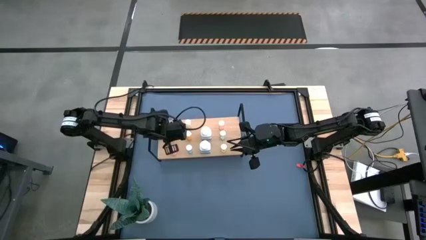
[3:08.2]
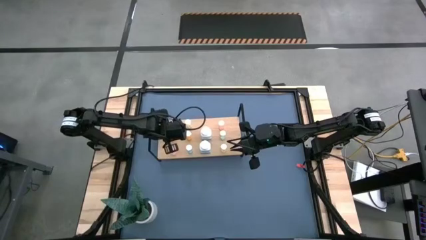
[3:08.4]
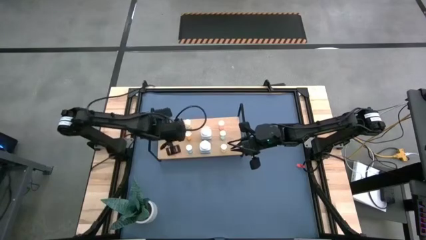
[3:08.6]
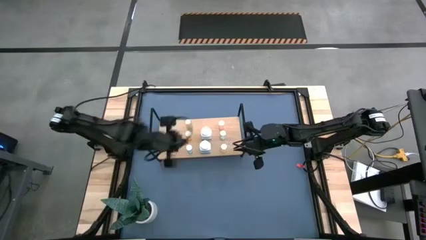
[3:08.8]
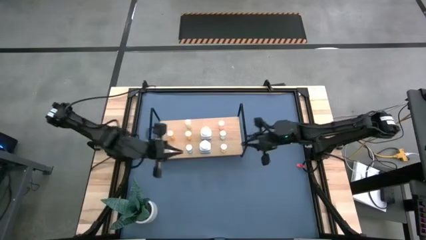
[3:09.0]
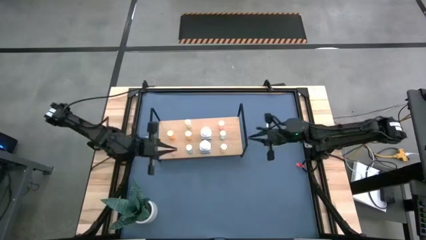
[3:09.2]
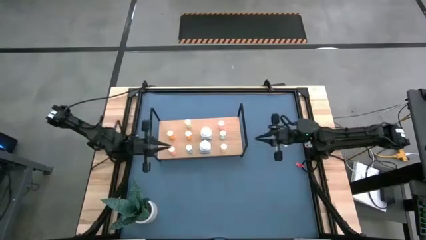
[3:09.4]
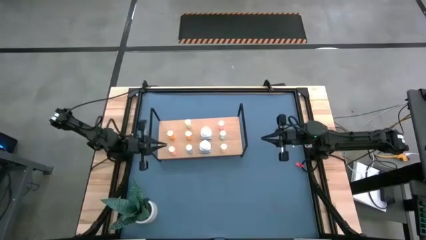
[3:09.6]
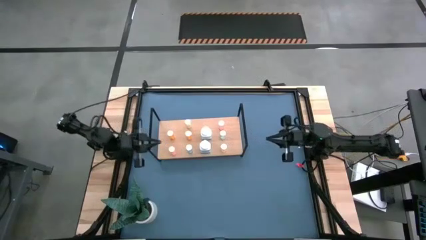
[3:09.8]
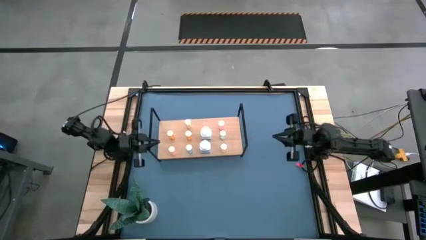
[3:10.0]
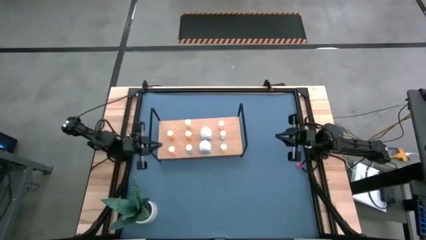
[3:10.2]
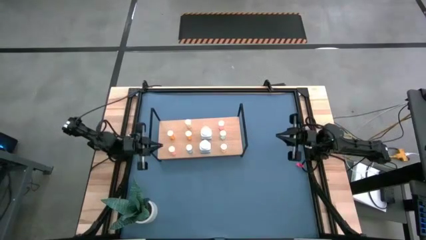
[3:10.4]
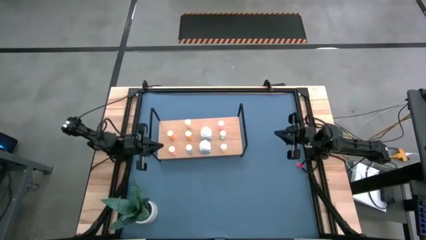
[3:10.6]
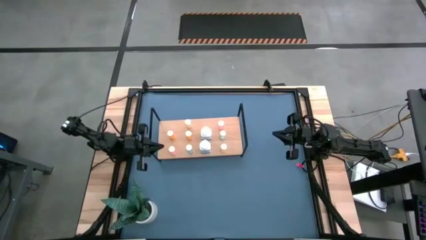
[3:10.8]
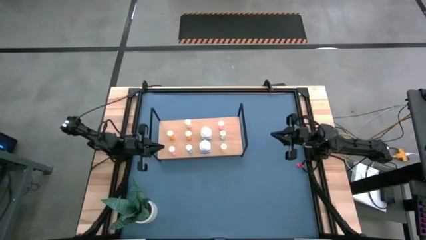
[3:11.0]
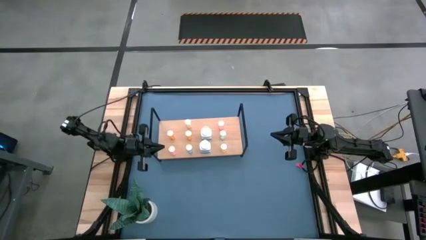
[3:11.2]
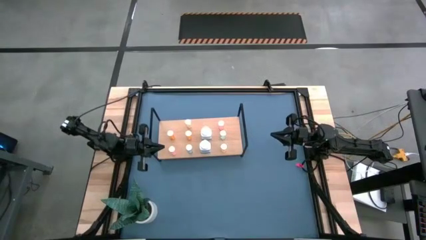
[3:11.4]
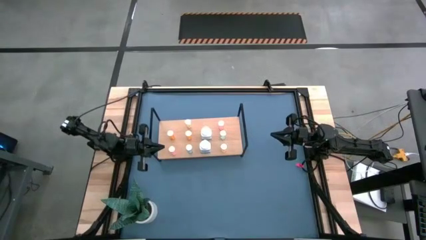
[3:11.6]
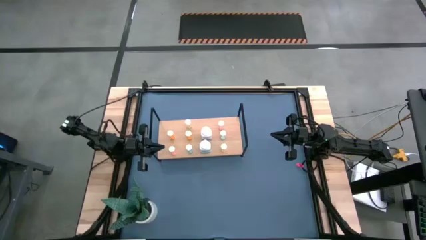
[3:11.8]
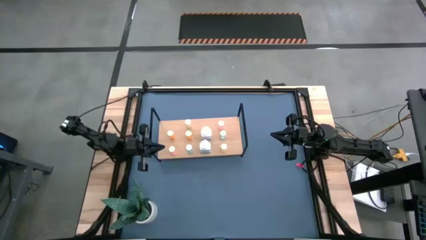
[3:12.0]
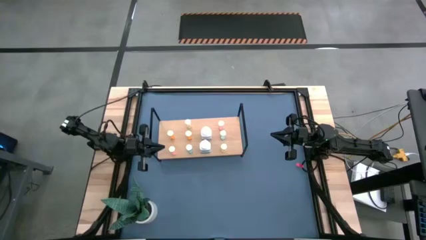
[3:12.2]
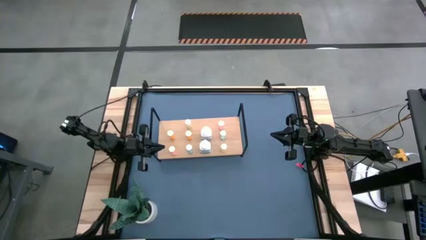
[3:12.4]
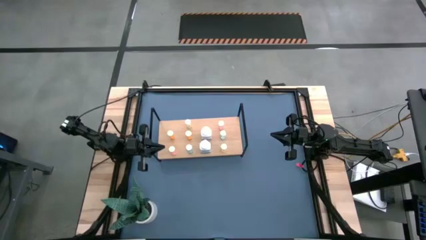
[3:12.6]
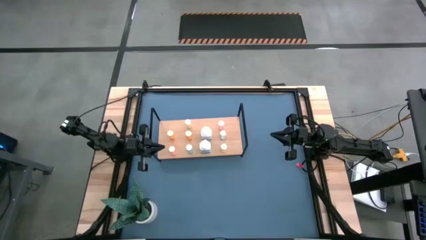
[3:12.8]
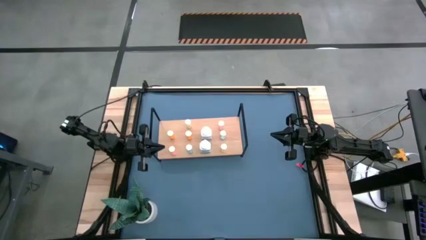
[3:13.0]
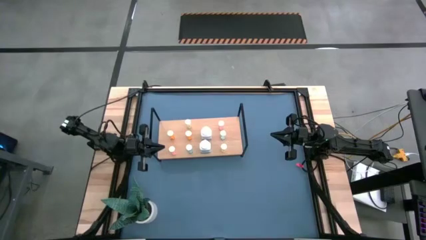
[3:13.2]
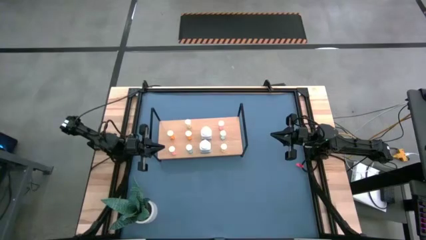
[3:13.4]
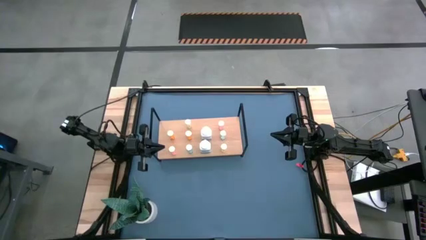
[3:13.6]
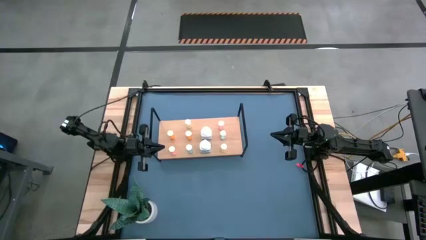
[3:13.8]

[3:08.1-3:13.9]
Task: Pick and place medicine bottles onto shelf by color
Return to Home Position

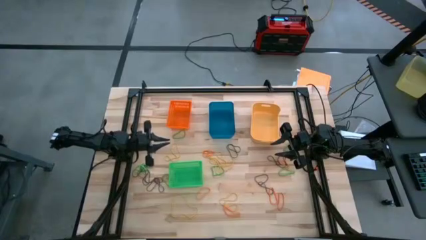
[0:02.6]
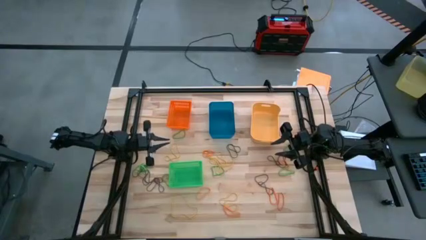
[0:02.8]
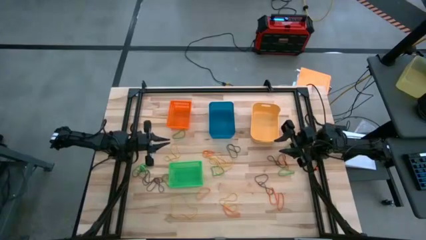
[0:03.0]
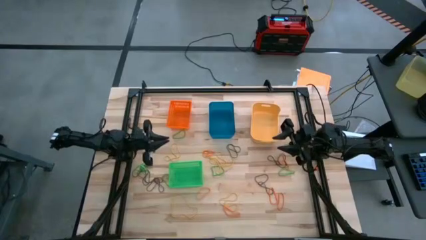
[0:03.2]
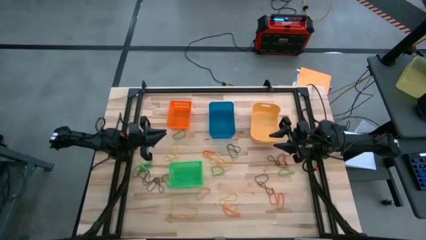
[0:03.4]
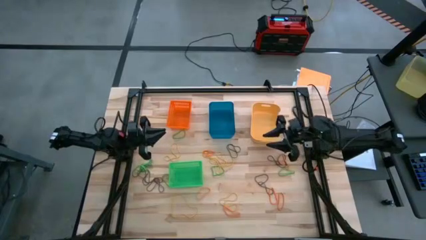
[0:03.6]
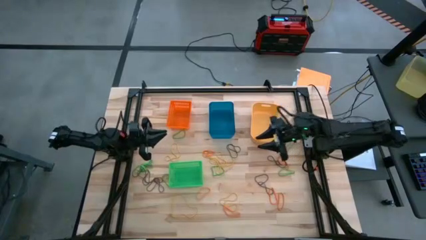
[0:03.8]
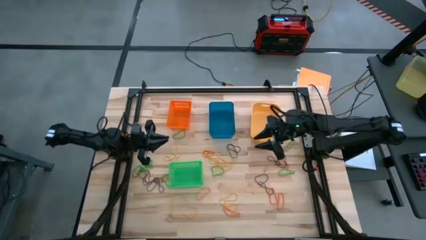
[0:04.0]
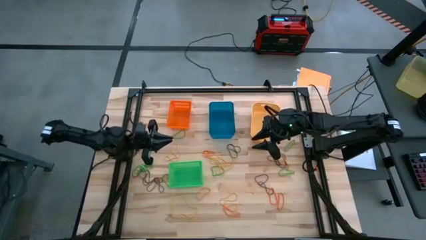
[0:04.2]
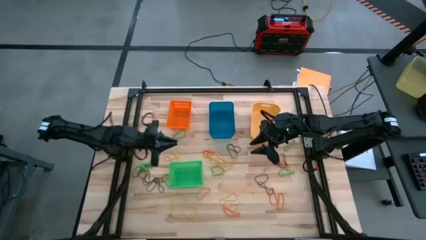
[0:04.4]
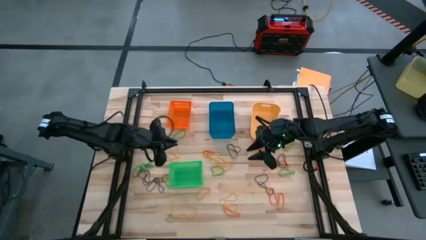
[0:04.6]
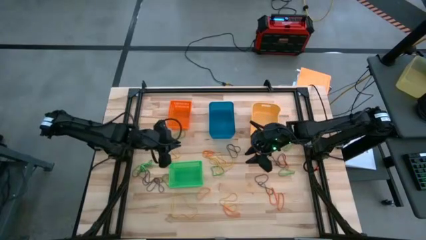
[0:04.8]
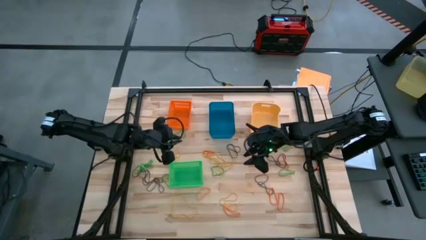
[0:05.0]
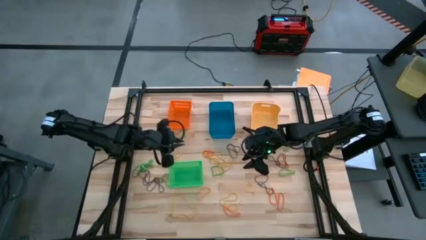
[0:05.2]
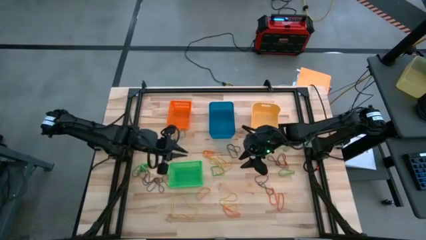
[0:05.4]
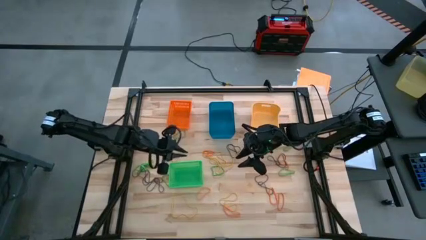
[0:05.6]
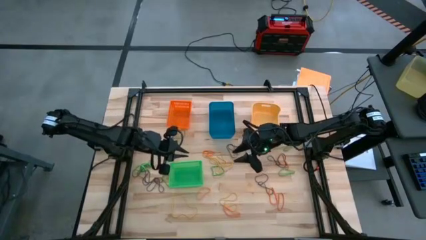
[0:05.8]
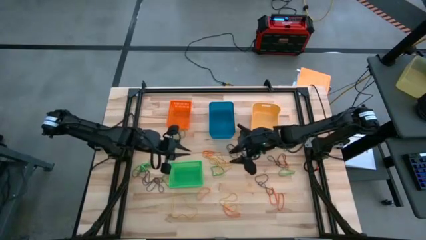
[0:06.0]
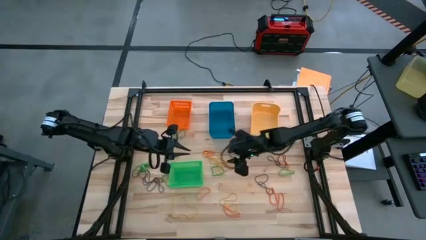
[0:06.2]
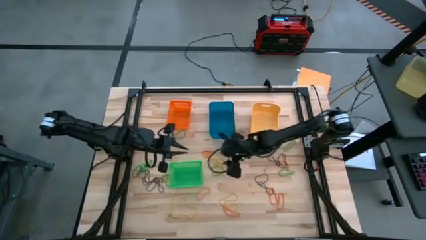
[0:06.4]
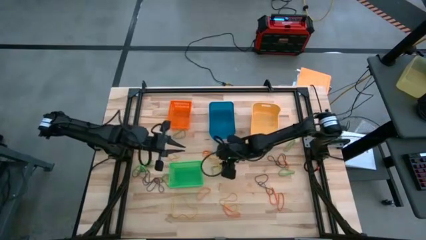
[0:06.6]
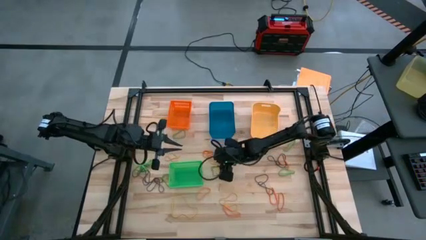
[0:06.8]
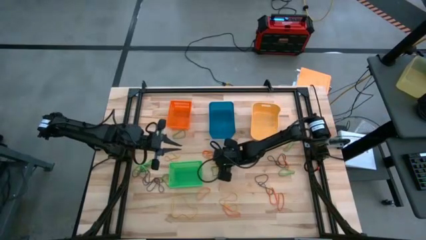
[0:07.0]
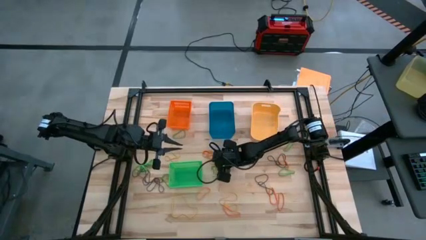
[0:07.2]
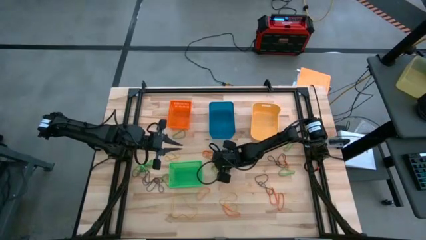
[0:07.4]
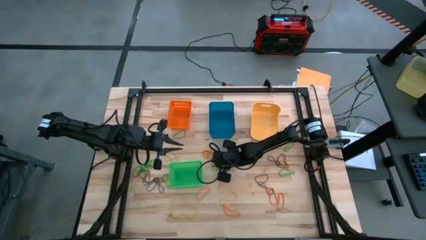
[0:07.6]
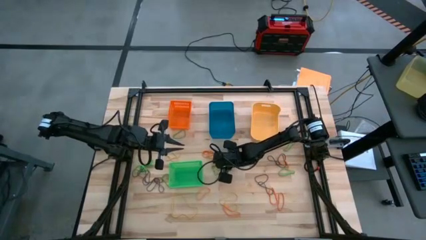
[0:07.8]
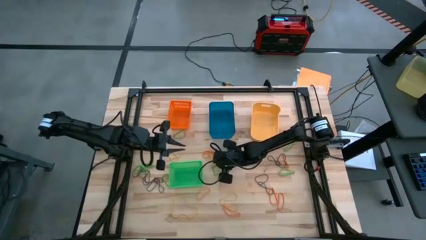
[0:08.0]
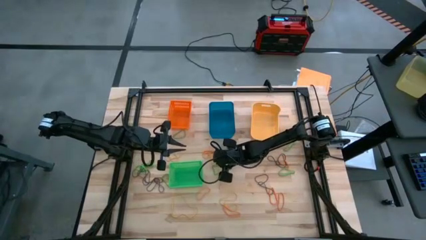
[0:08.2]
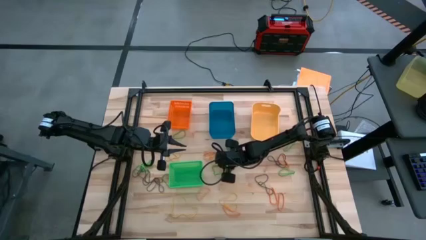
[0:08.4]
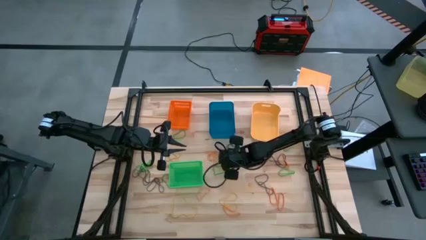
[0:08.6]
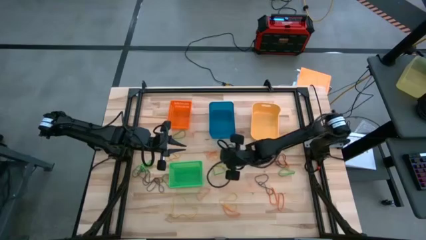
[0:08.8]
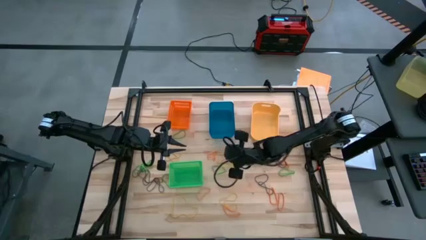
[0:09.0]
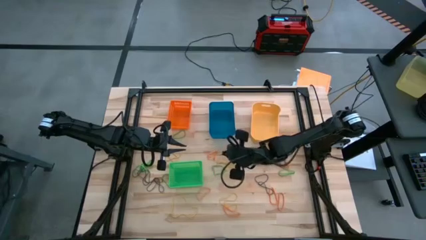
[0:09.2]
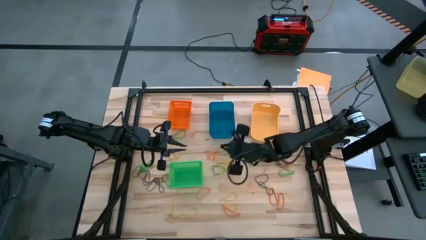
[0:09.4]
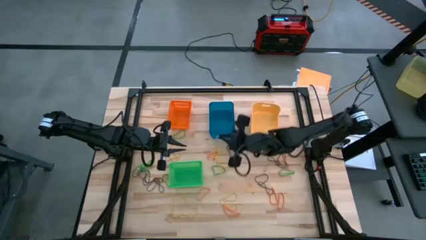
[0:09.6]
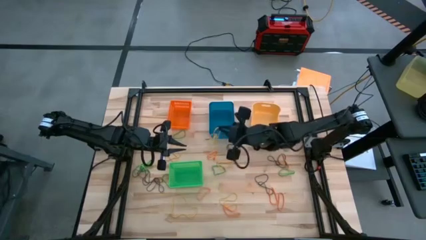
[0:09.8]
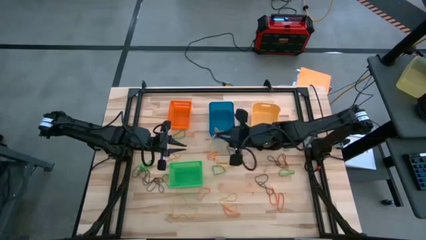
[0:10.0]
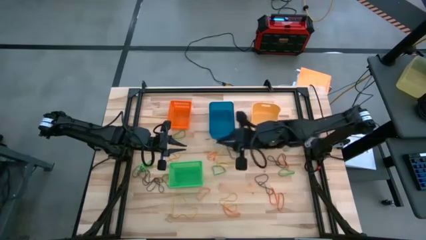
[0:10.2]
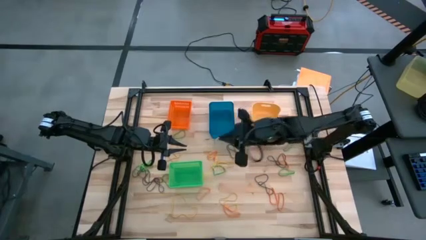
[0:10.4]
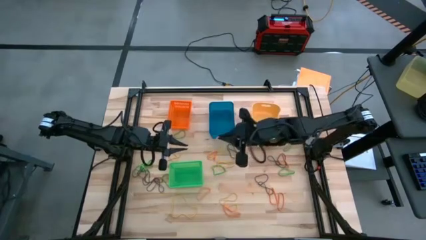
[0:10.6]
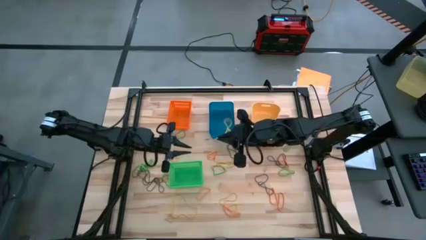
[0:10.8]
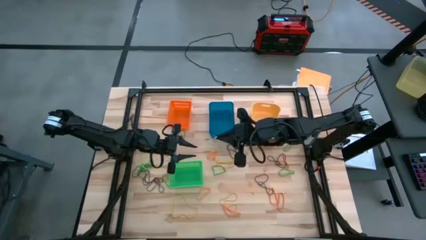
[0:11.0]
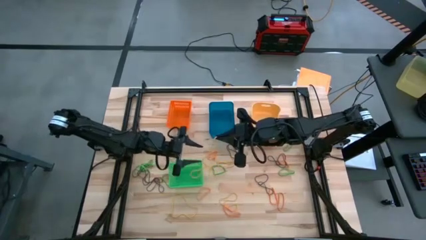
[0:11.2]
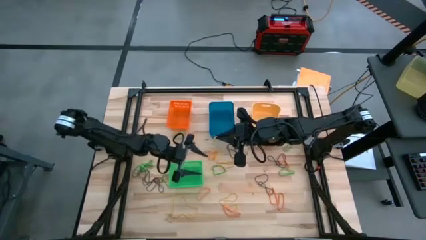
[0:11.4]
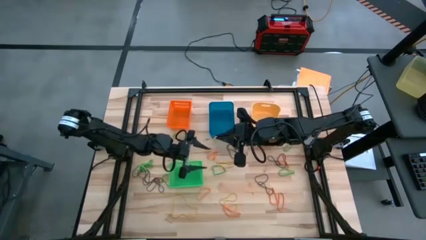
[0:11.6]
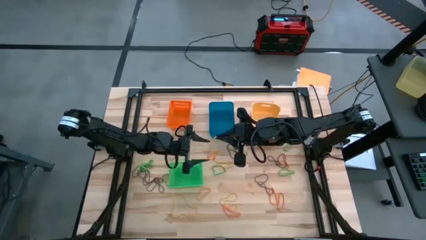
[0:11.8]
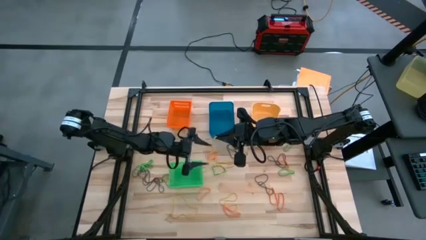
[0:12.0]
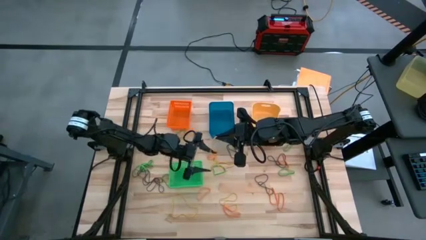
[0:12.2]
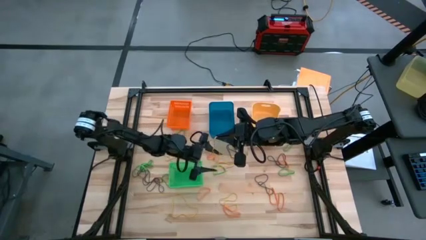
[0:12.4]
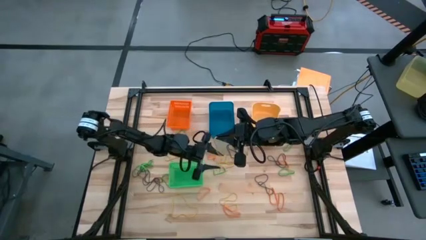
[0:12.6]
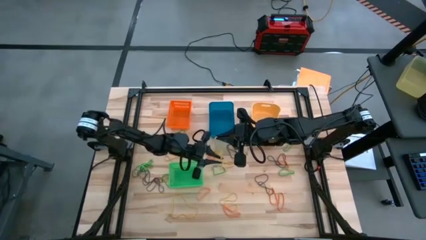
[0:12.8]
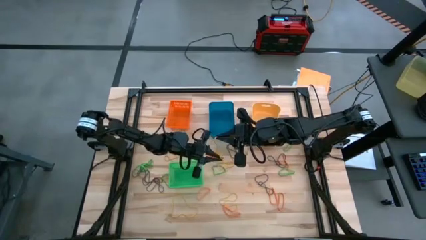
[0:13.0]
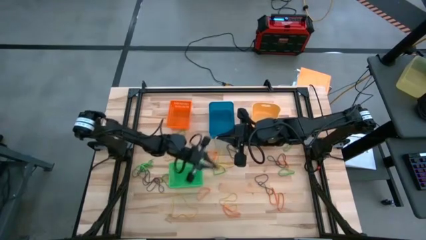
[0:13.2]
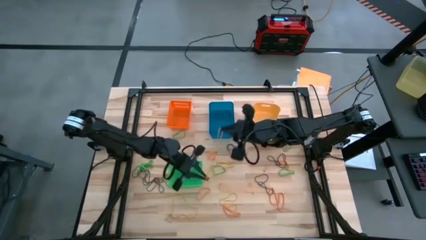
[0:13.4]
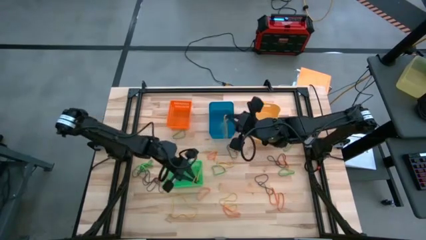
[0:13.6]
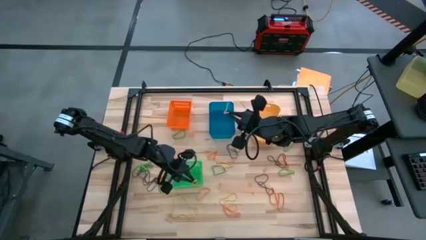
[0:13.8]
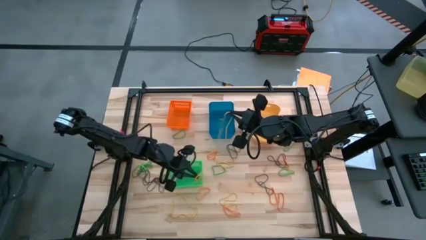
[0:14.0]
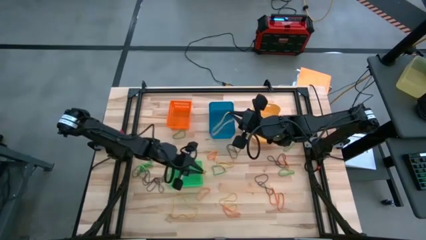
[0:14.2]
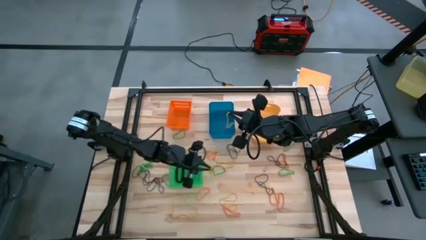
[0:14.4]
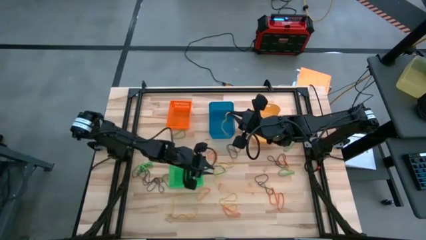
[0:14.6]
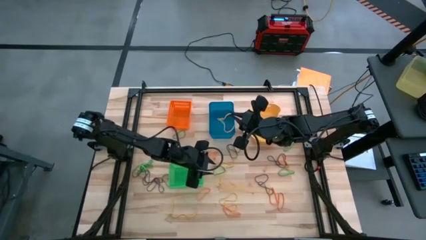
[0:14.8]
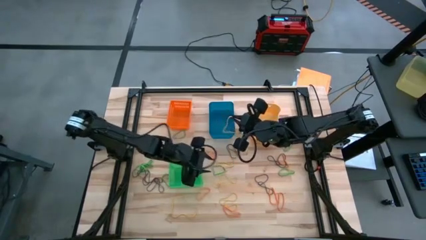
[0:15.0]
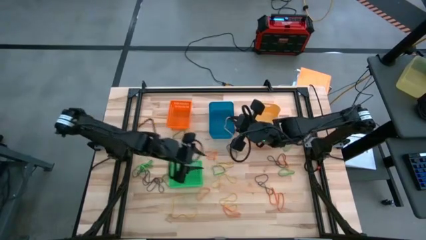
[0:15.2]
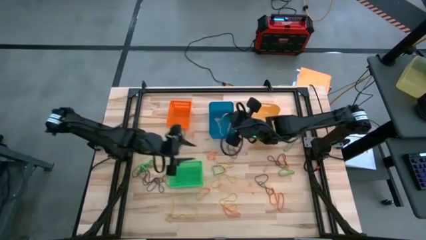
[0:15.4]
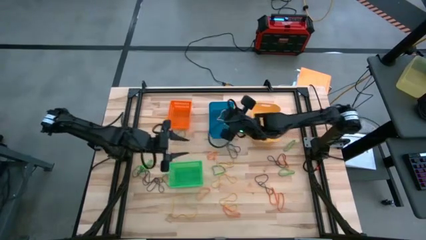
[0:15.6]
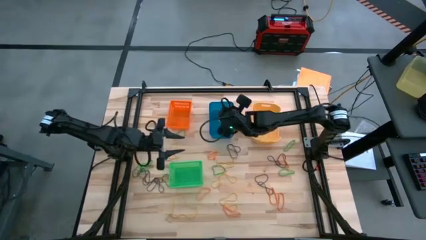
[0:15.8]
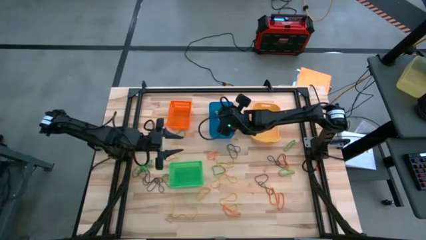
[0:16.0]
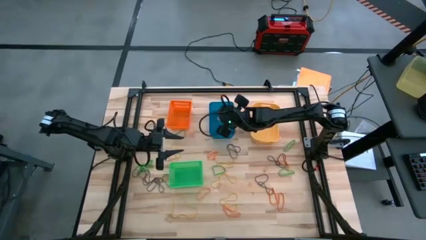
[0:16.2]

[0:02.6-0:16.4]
Task: Sort rubber bands into baskets
Put the yellow rubberband into the blue bin
